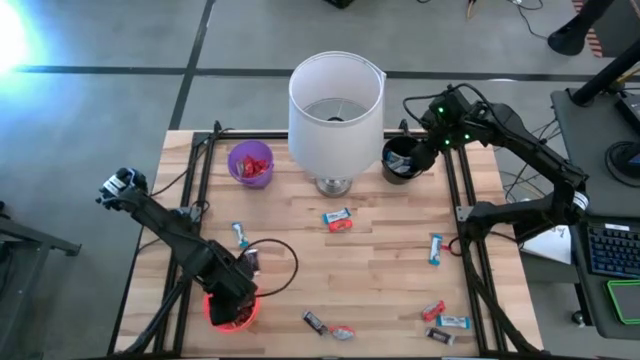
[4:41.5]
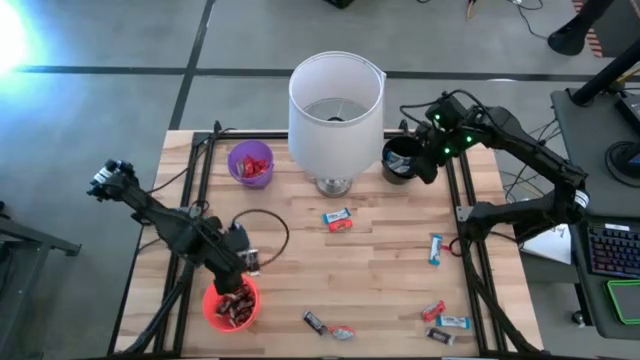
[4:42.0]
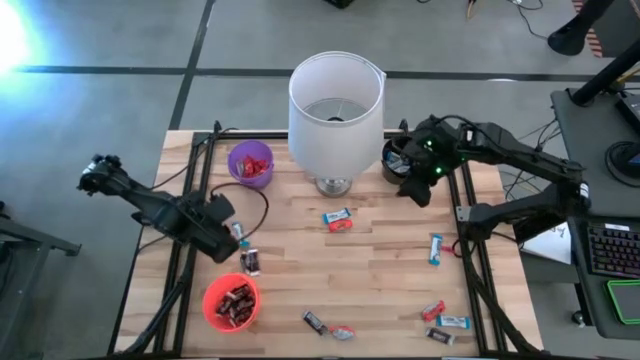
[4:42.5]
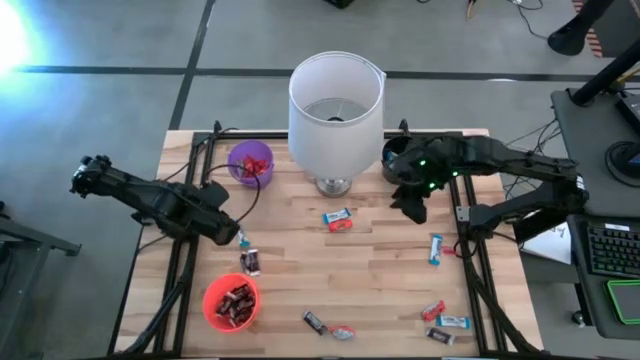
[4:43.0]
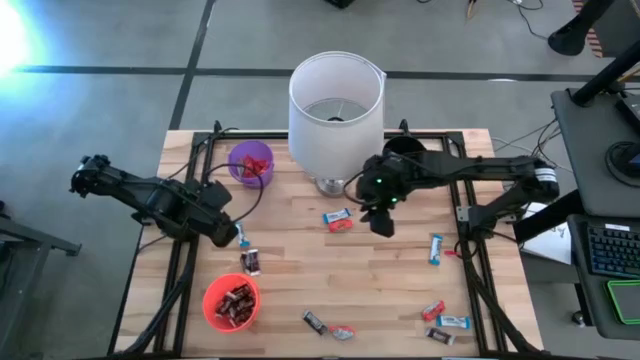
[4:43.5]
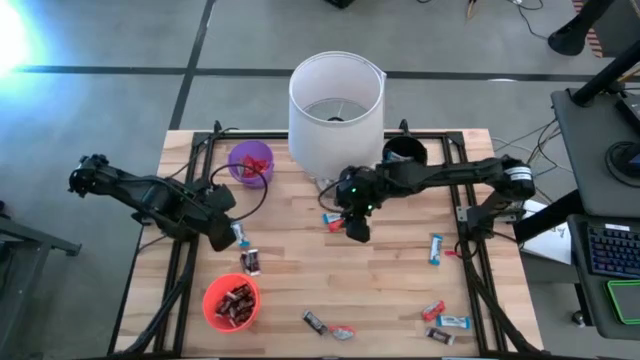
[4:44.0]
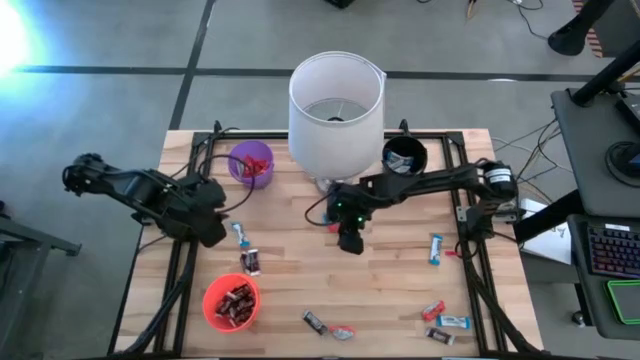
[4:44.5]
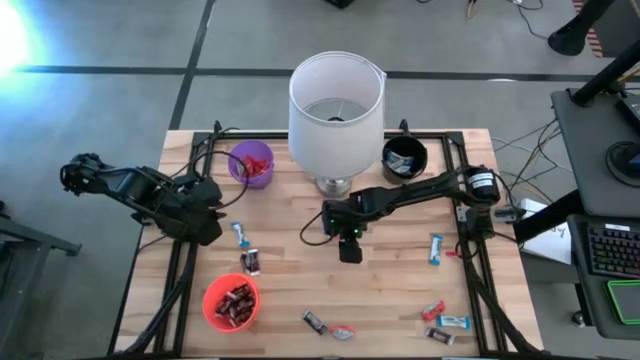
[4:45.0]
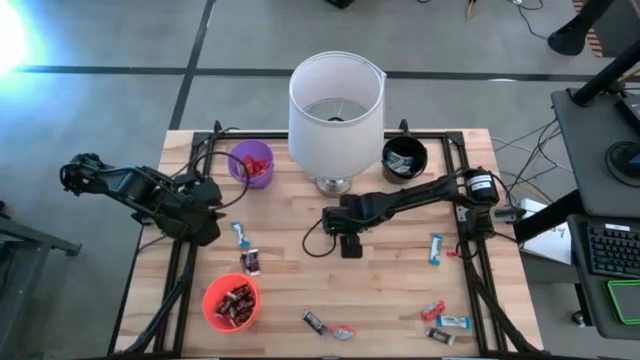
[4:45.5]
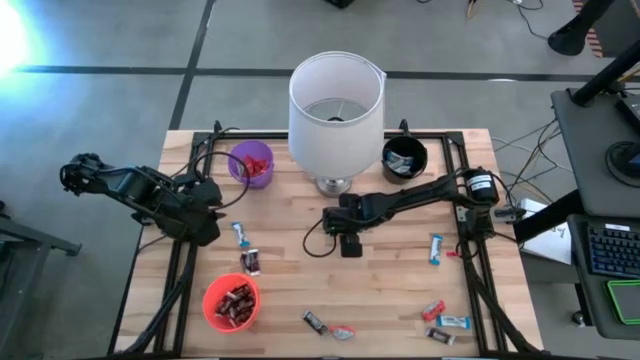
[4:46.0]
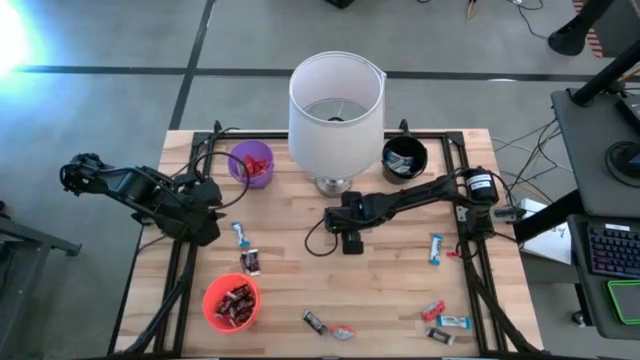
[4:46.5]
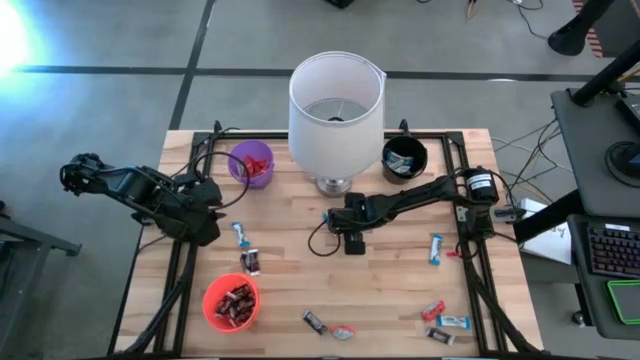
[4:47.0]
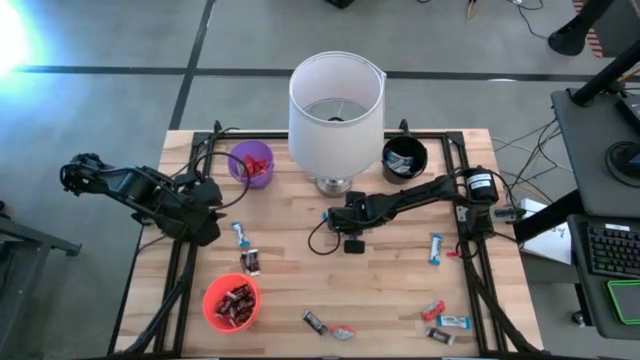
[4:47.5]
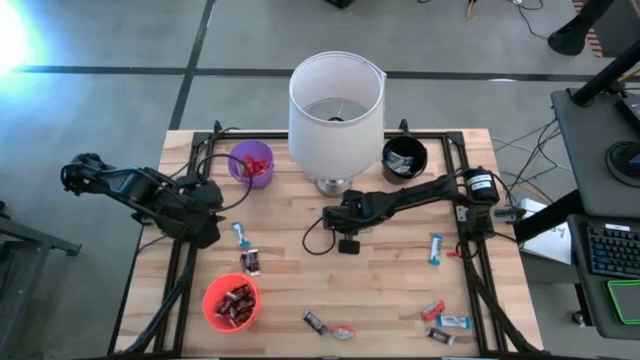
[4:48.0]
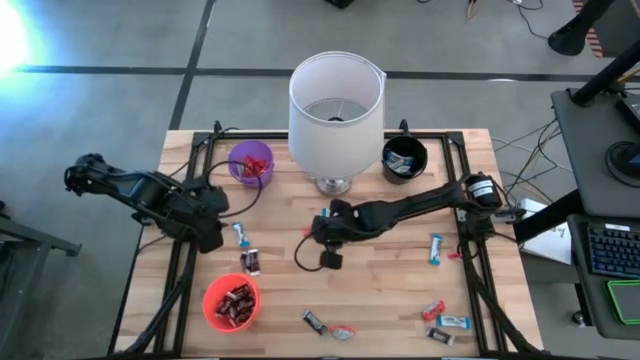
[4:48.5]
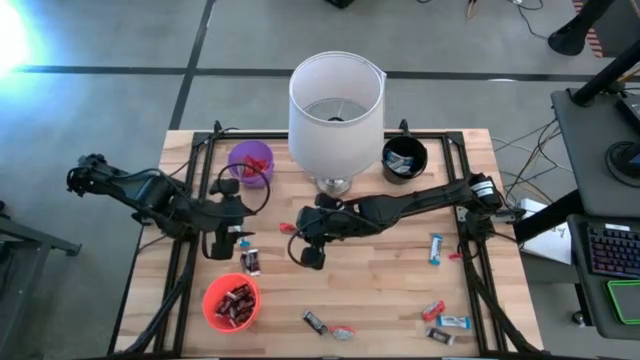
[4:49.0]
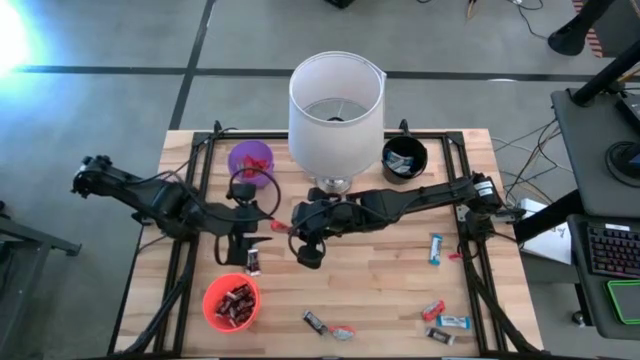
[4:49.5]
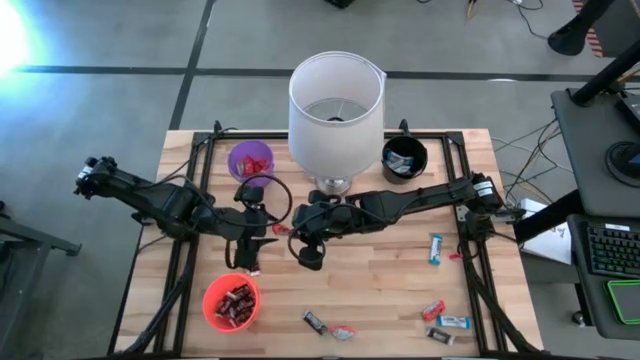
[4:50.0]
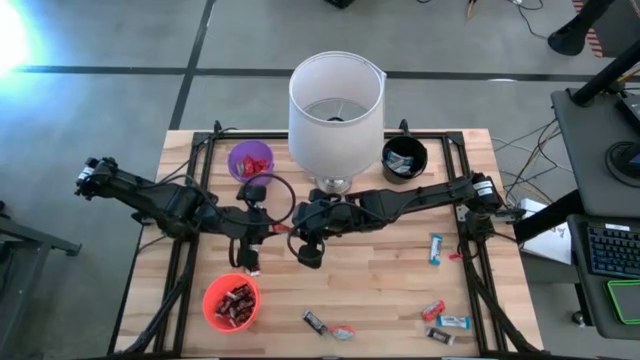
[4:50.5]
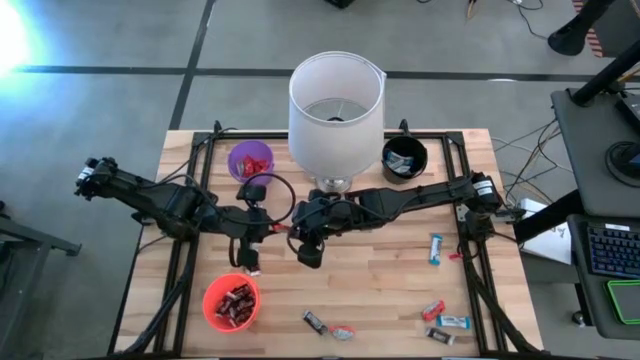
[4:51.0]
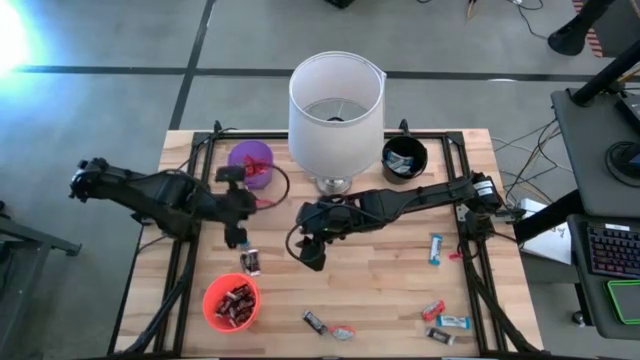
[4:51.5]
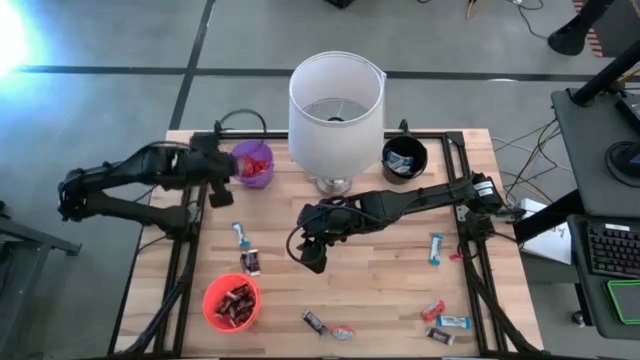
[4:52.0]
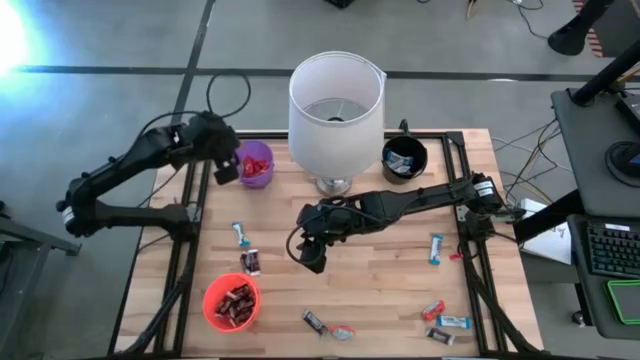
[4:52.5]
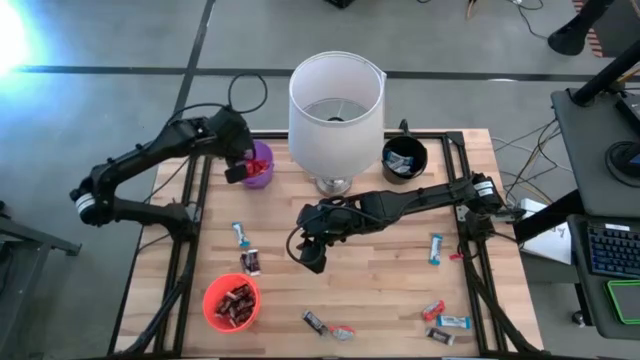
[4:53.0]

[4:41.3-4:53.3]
Task: Sort candy
Put the orange chocolate into the purple bucket

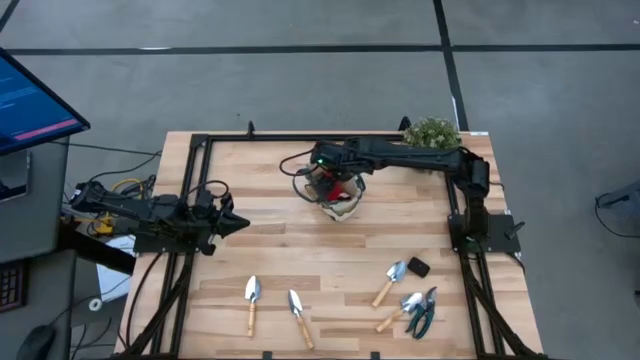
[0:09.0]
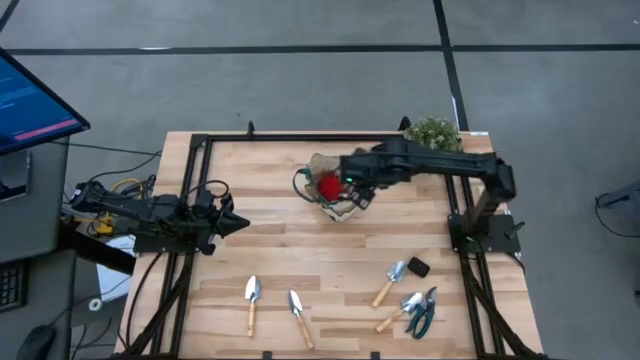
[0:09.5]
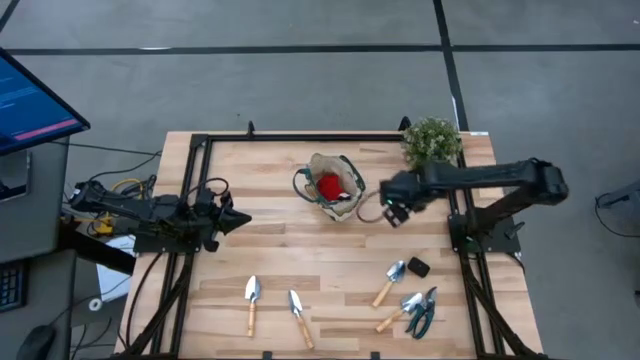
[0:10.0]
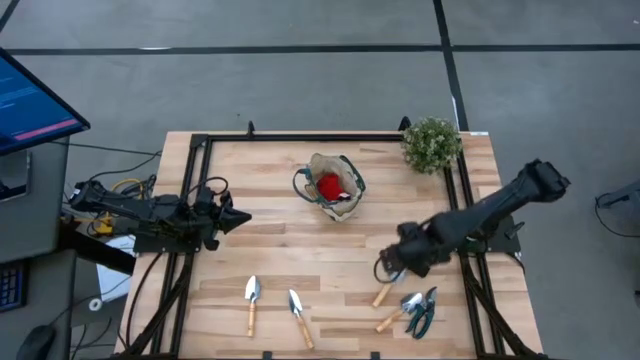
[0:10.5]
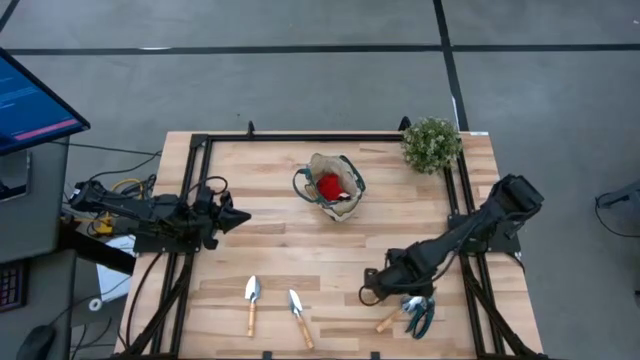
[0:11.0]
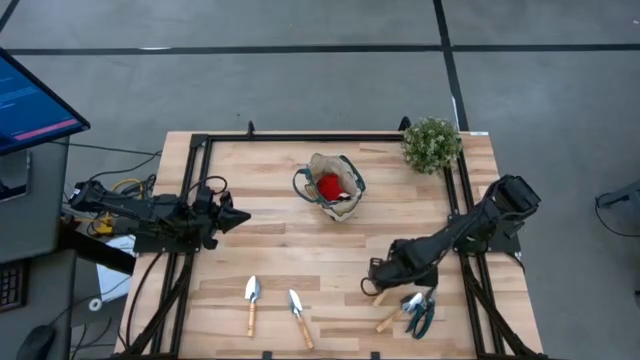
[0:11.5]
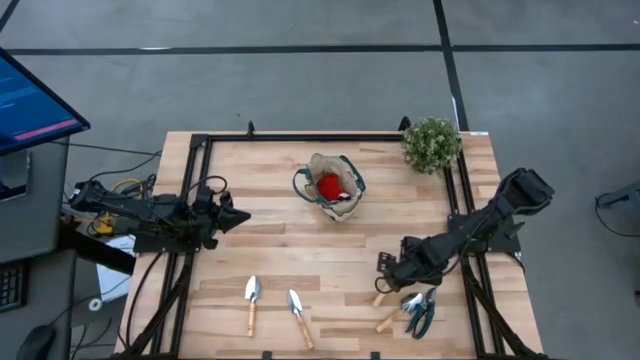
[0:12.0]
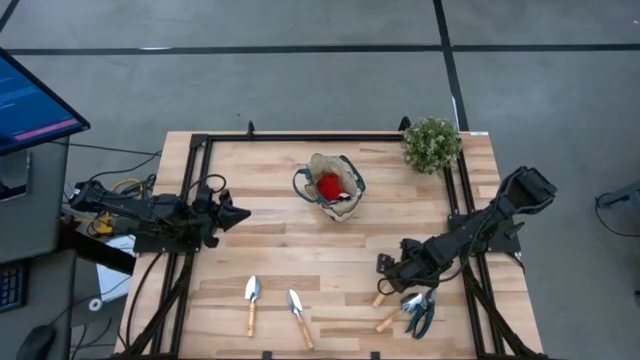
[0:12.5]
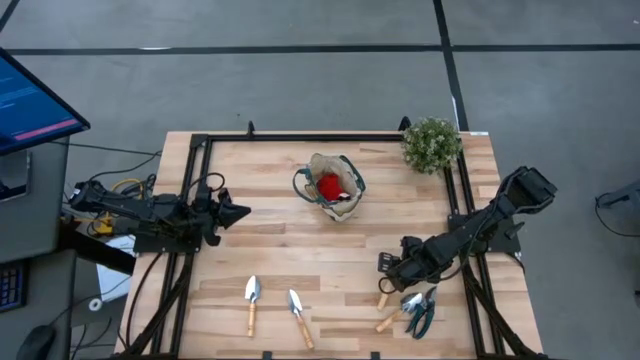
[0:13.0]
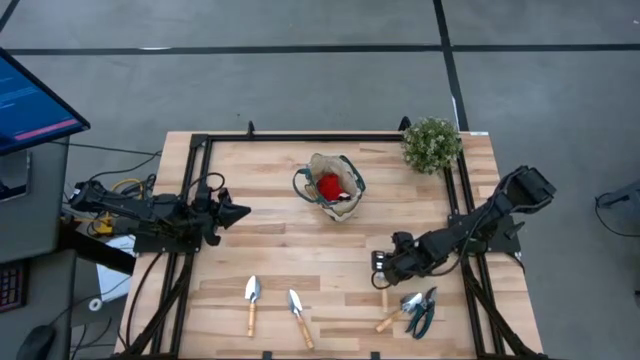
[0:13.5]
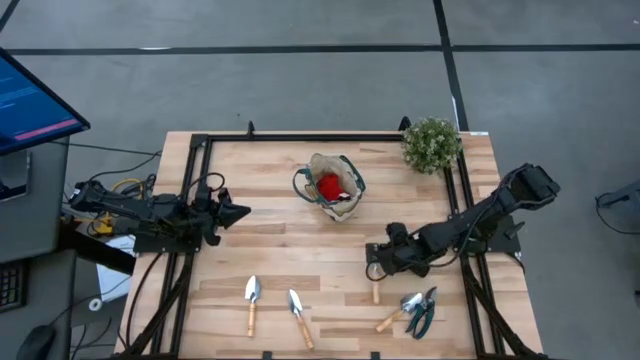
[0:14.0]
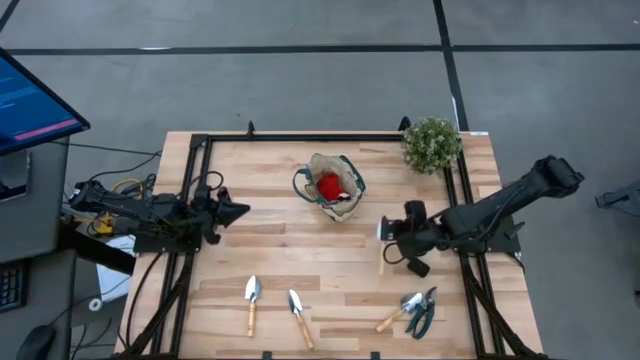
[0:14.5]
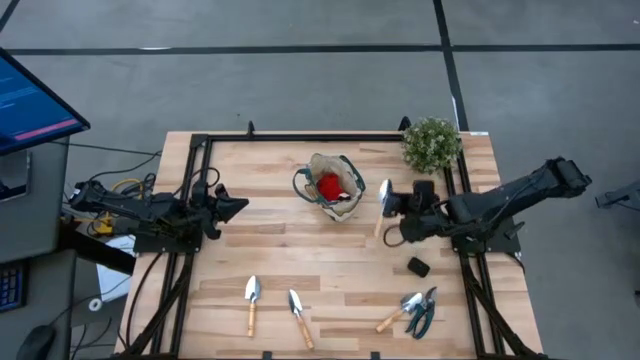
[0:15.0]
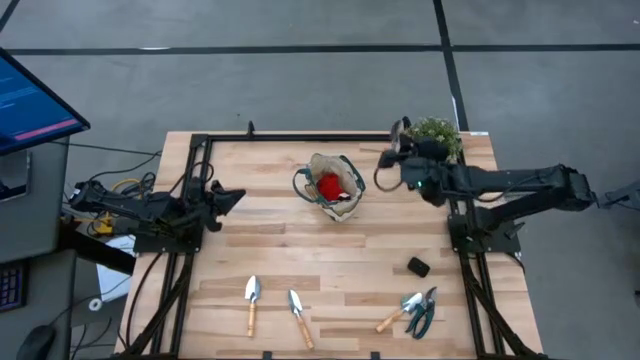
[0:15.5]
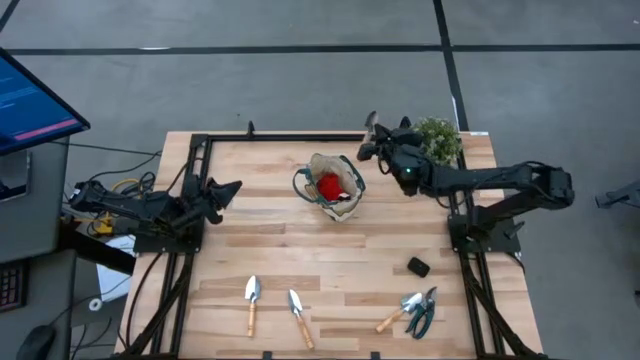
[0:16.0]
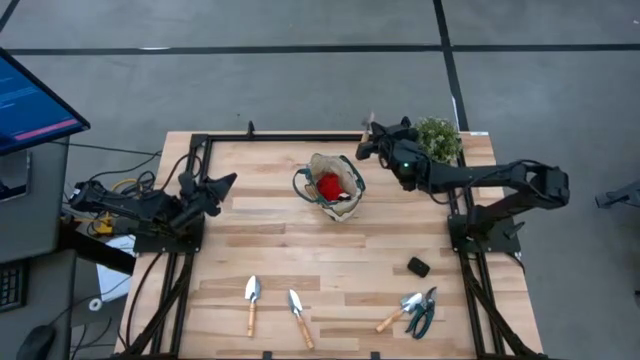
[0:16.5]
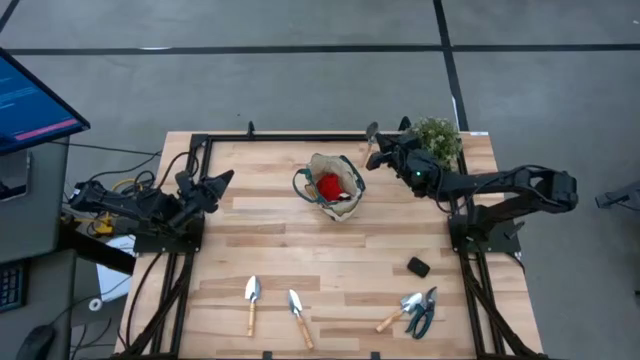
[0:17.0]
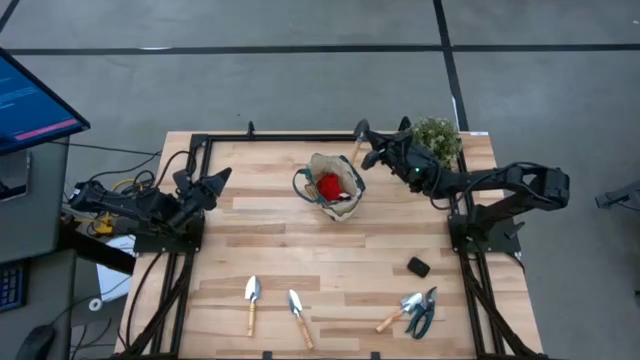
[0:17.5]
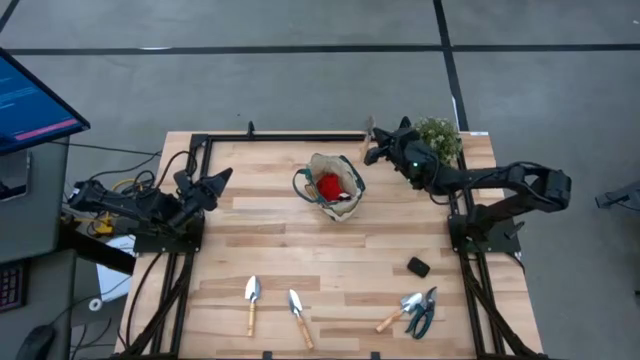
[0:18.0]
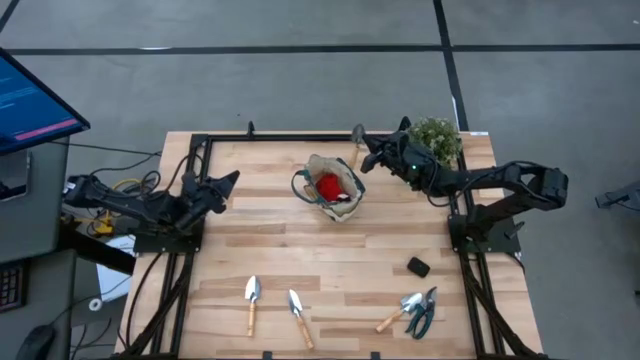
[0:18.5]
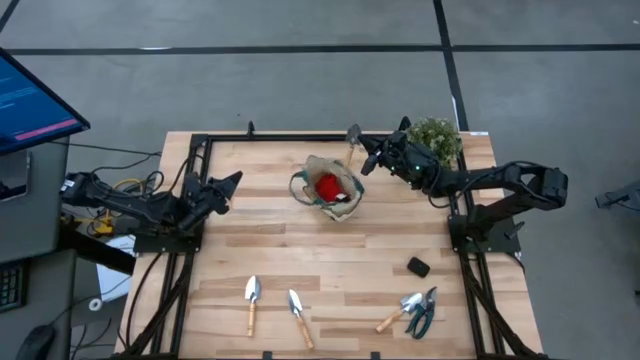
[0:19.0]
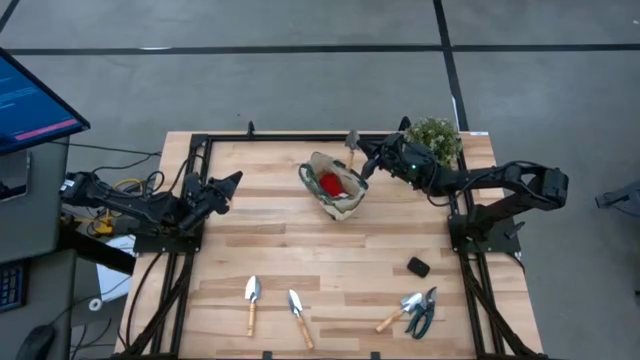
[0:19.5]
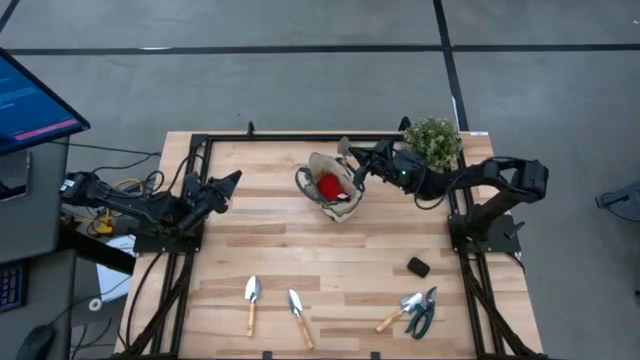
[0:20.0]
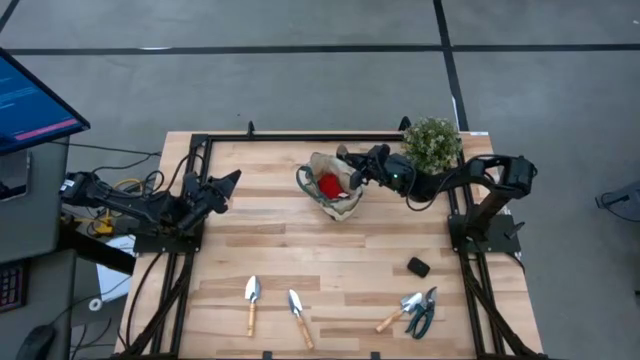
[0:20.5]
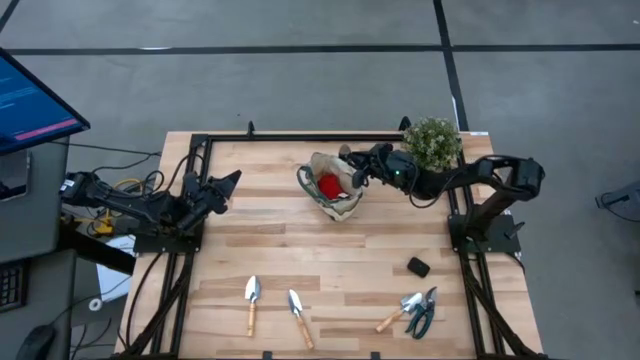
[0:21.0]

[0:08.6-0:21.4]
Task: Pick & Place Garden tools in Gardening bag
Put the brown trowel into the green gardening bag
